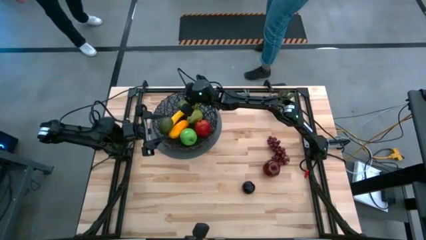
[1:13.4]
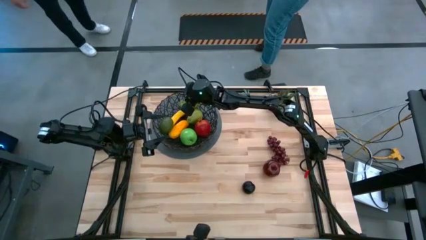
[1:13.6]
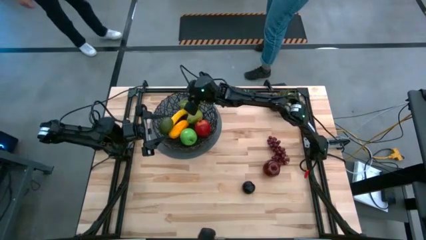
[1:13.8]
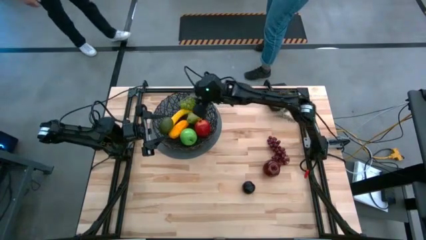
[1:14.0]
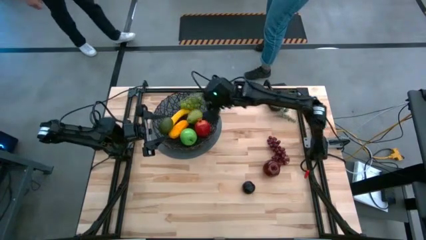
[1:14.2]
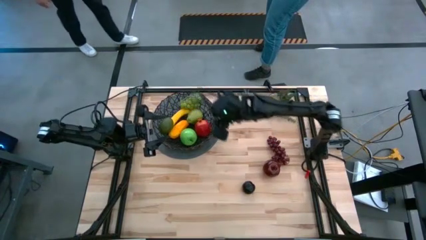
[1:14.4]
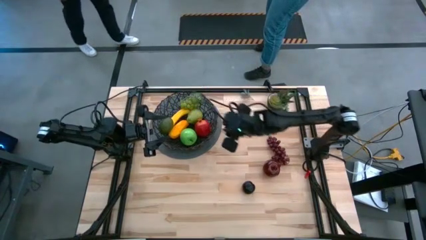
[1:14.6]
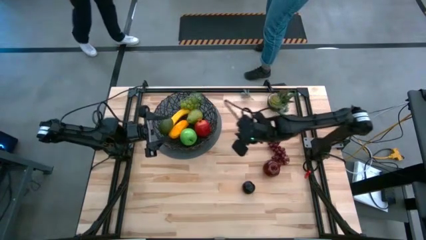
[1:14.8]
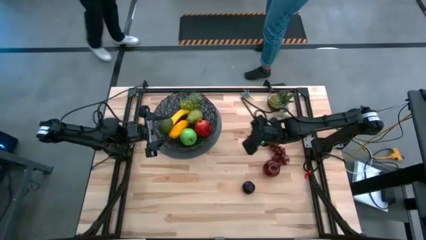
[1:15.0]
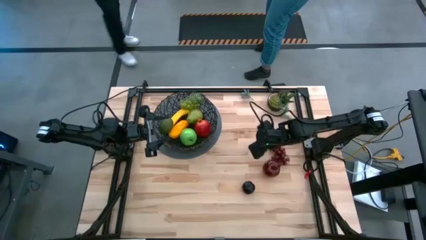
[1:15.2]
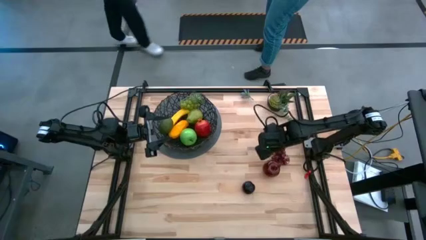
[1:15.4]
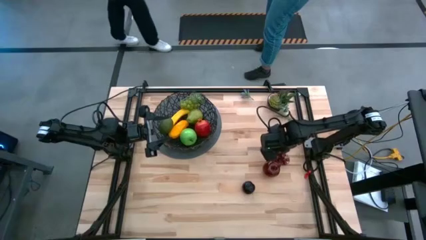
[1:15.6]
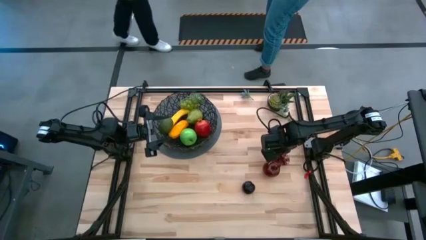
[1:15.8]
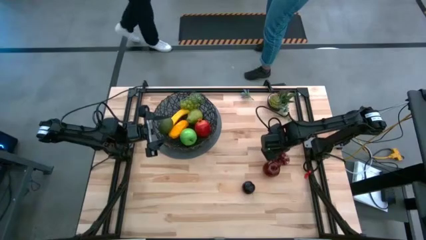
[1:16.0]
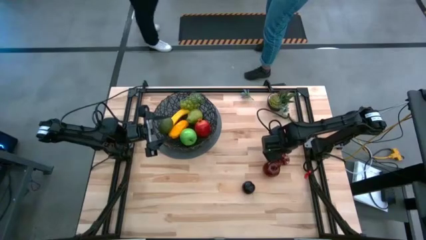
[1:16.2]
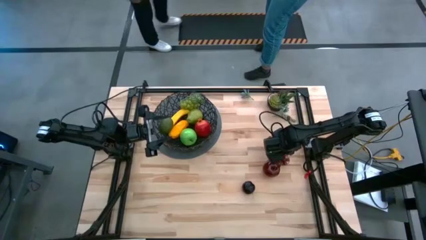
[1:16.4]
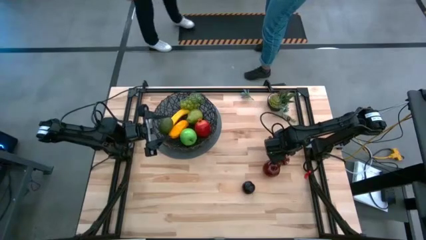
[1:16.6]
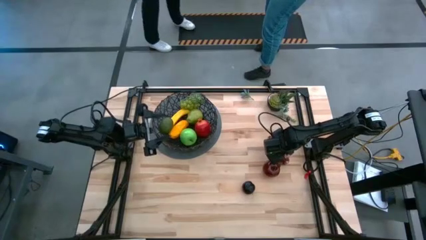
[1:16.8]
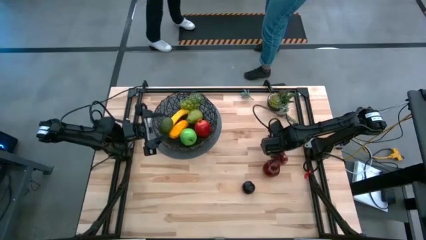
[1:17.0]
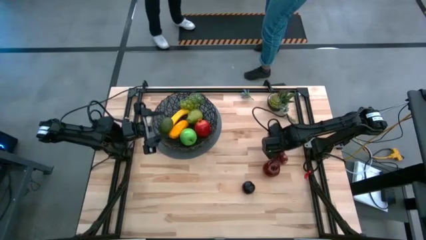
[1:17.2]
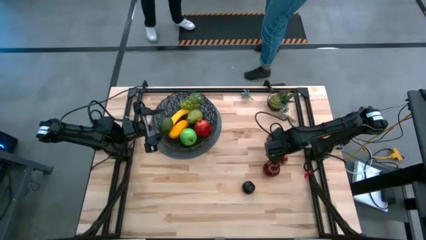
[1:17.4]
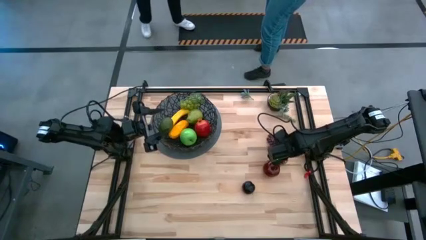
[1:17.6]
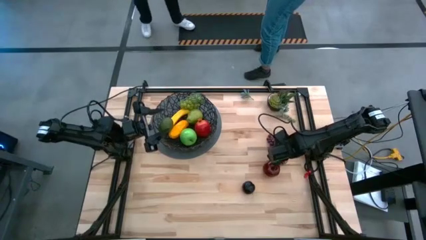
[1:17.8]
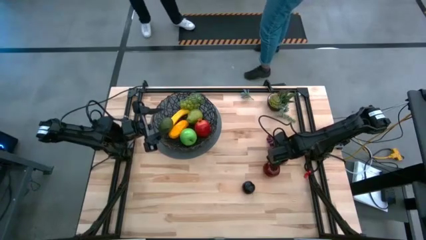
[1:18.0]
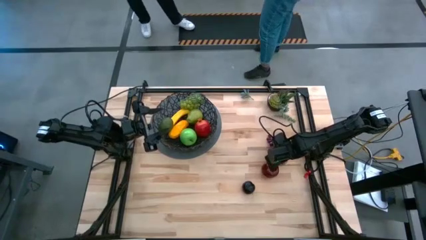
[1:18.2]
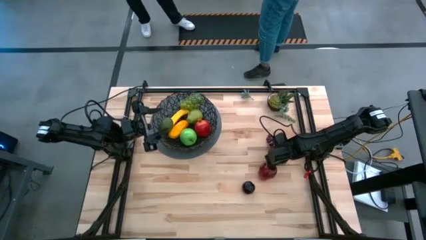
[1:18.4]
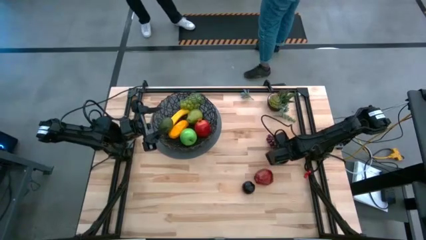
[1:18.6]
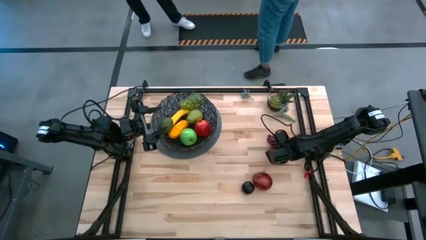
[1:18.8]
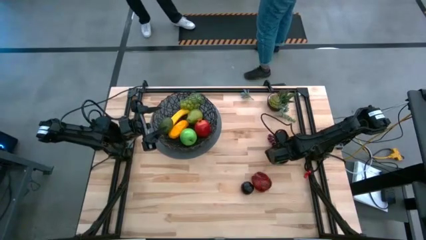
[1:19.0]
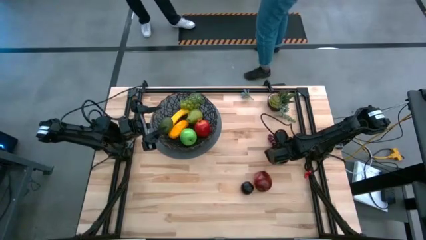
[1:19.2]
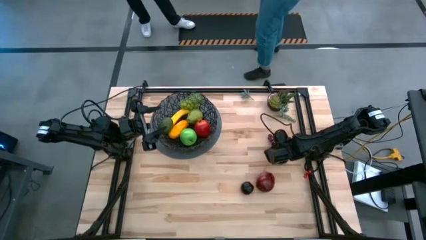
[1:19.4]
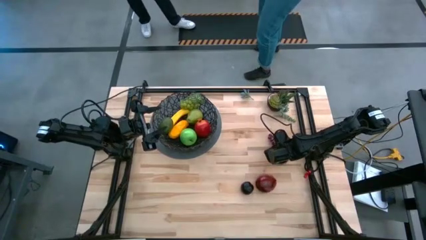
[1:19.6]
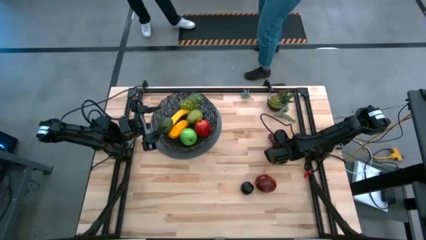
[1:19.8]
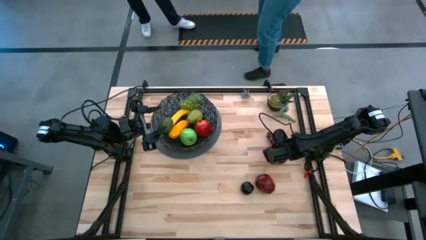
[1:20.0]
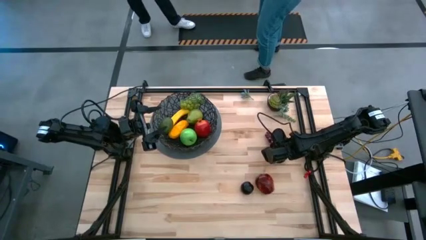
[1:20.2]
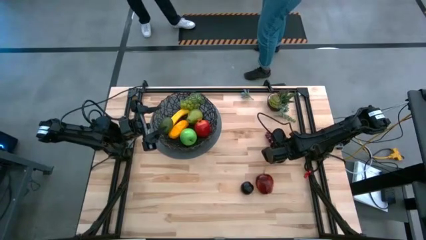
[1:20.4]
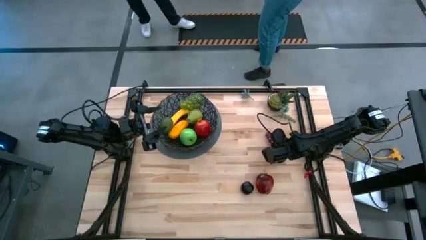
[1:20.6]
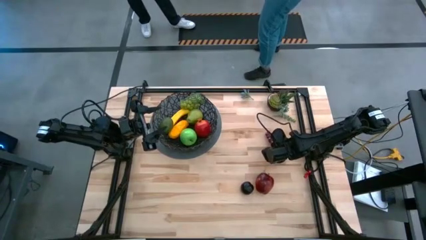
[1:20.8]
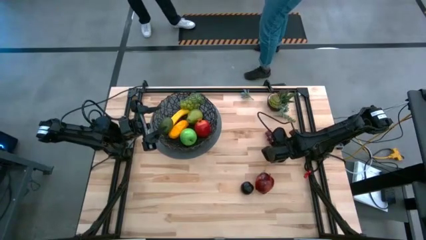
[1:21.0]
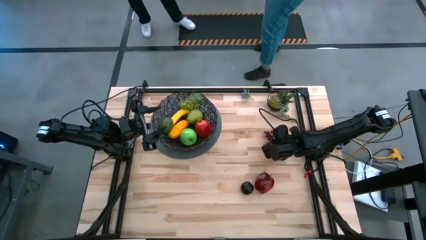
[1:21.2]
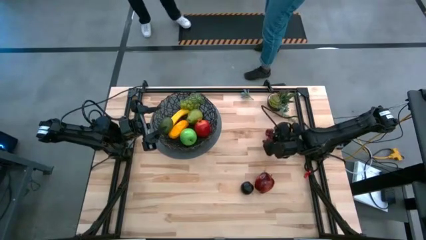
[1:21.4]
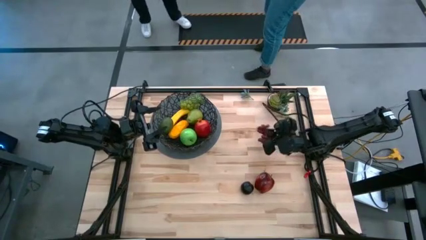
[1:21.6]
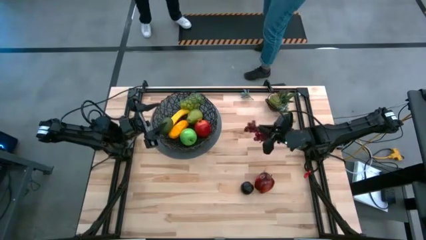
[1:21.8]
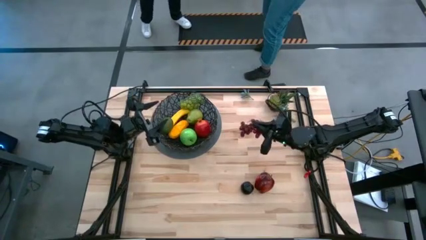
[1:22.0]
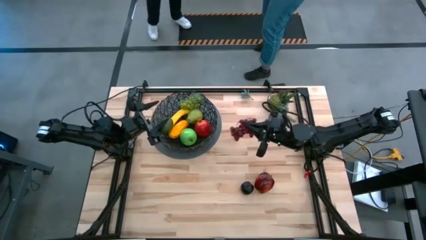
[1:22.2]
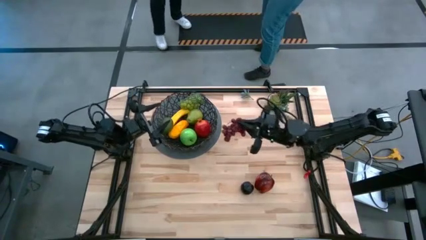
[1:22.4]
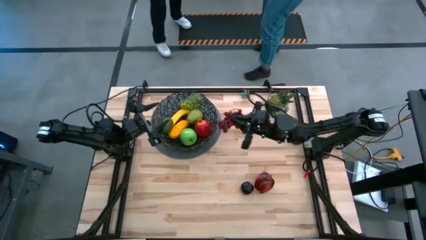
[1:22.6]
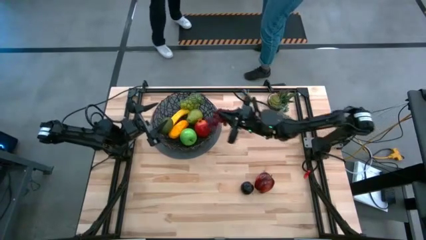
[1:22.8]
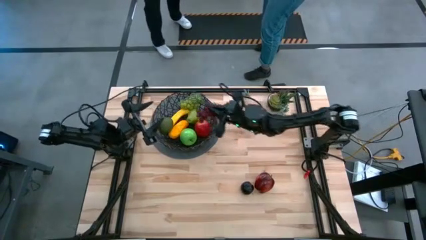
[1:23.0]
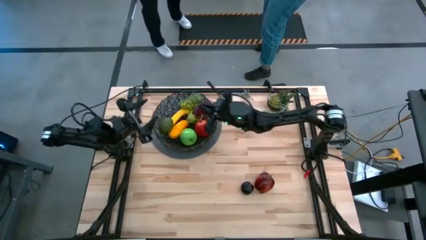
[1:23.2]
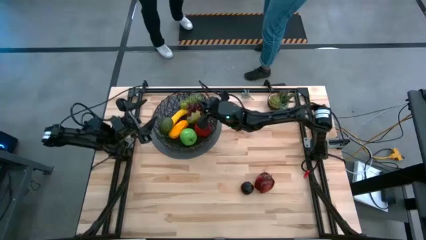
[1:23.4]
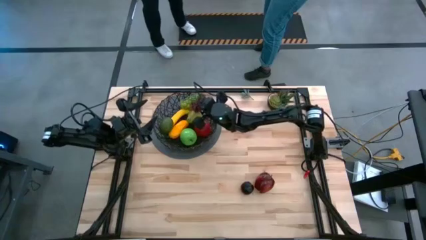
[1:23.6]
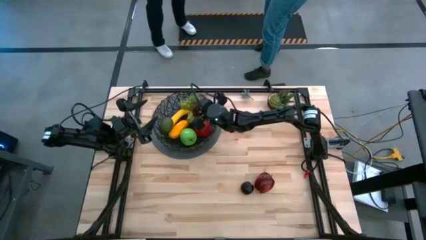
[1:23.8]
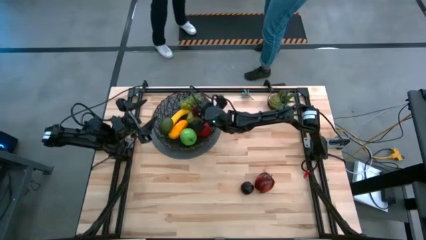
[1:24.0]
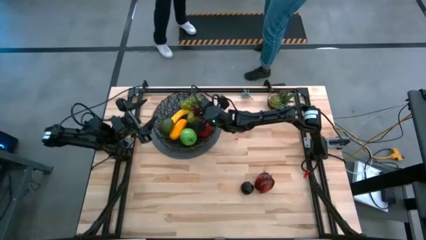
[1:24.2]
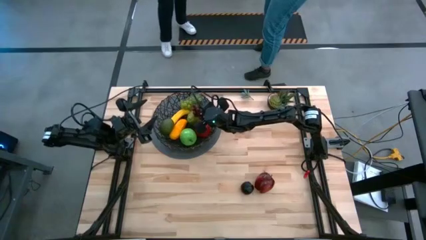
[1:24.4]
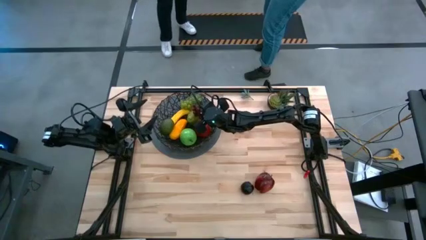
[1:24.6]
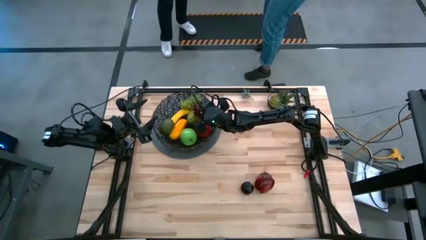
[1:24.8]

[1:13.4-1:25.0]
Task: Build produce basket
Put the red grapes into the basket
